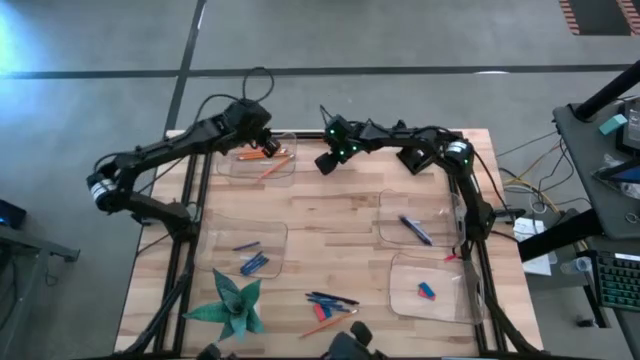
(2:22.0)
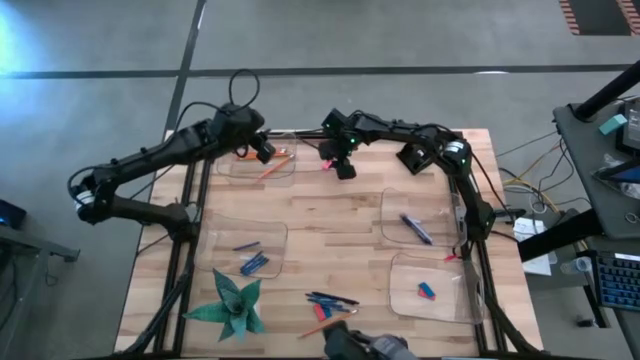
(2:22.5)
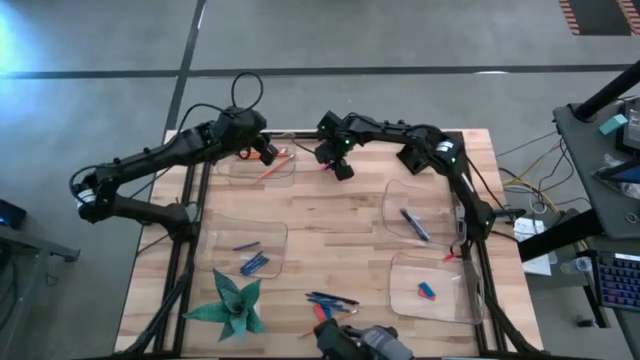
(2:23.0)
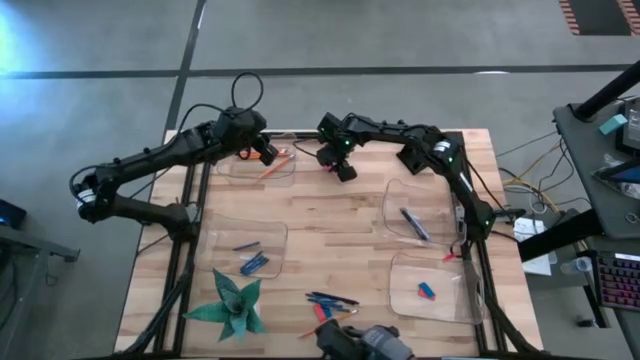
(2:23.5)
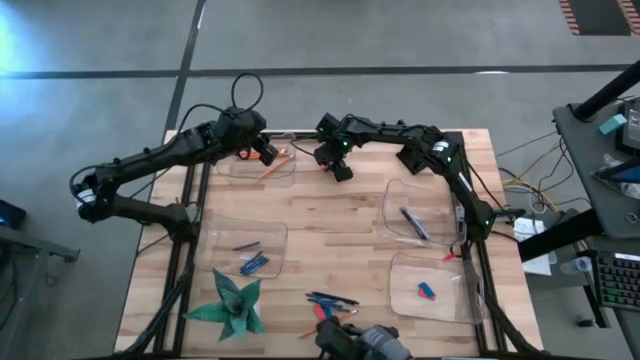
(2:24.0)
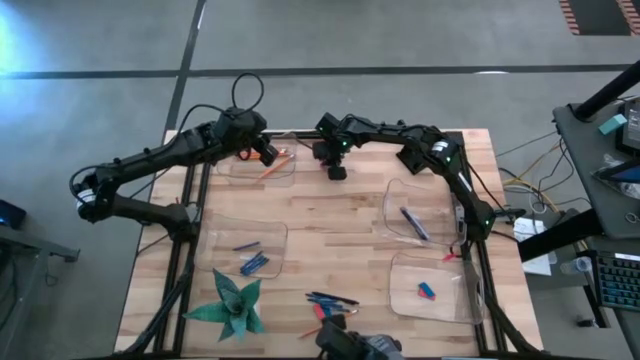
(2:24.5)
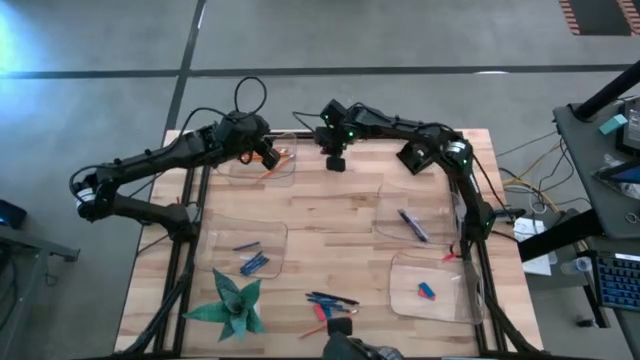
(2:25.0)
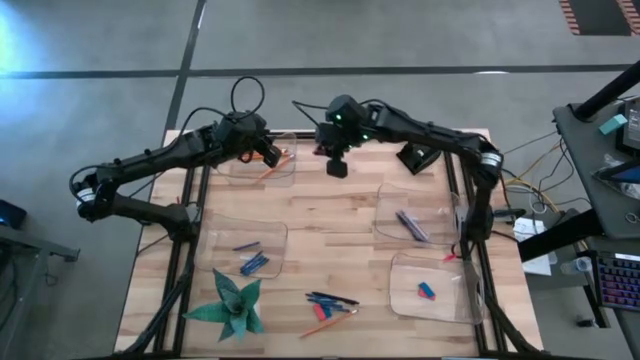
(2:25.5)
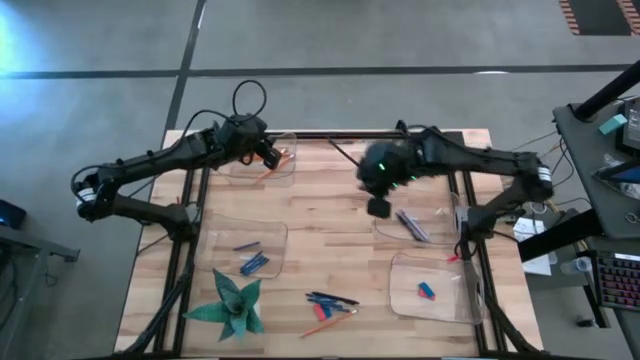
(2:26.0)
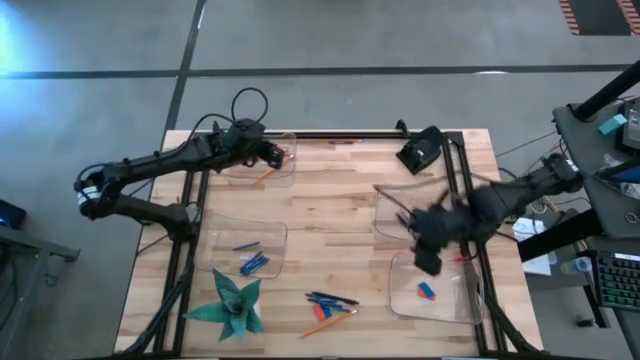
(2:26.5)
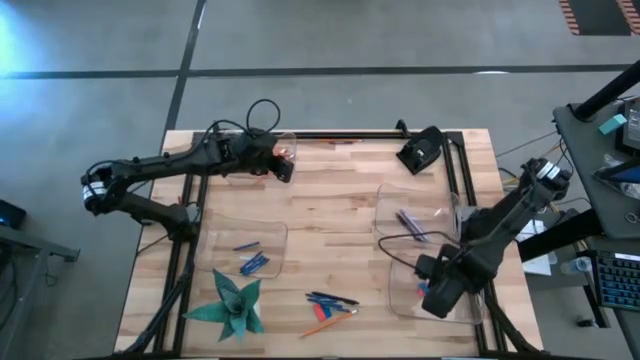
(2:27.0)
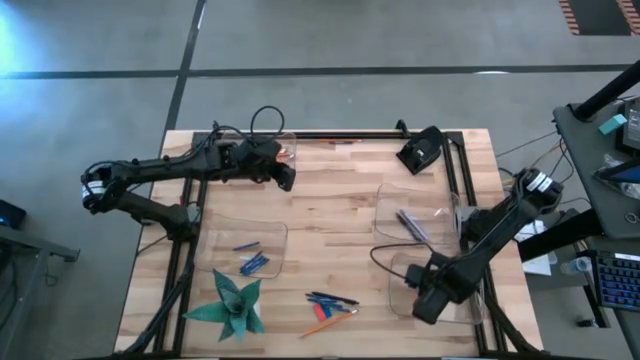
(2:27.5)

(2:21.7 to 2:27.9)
Task: Sort crayons/erasers/pens/pencils in bins
Put the pink eraser into the bottom right transparent bin

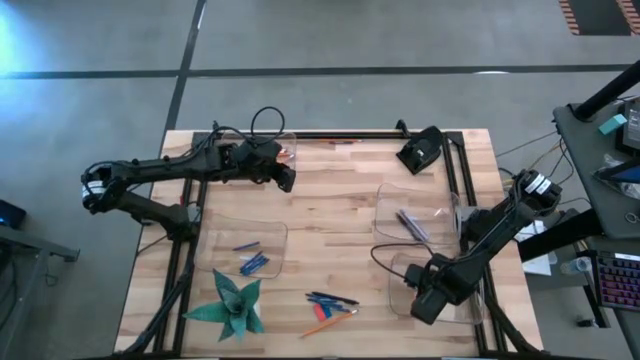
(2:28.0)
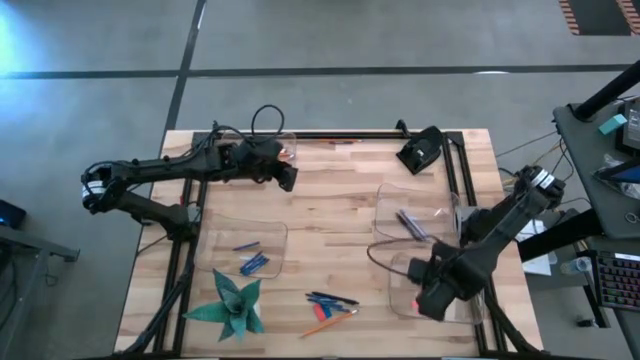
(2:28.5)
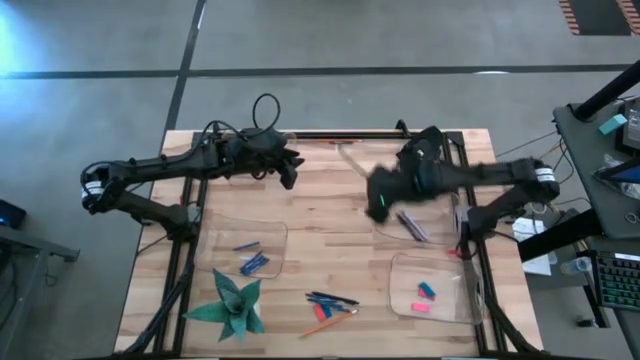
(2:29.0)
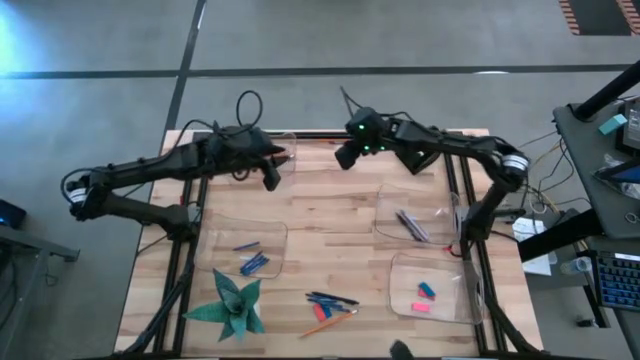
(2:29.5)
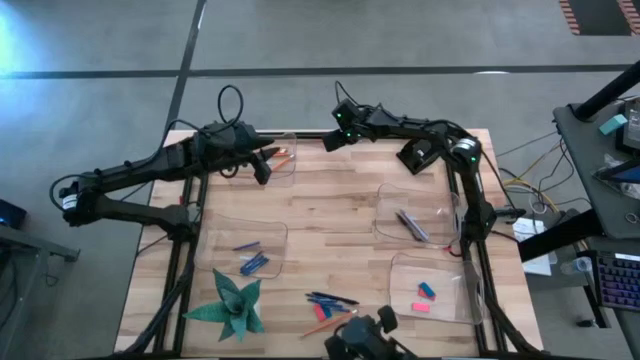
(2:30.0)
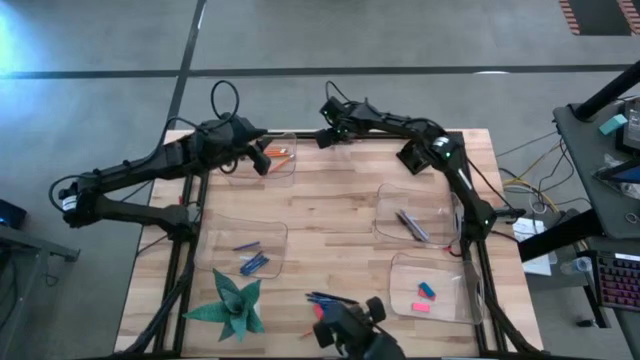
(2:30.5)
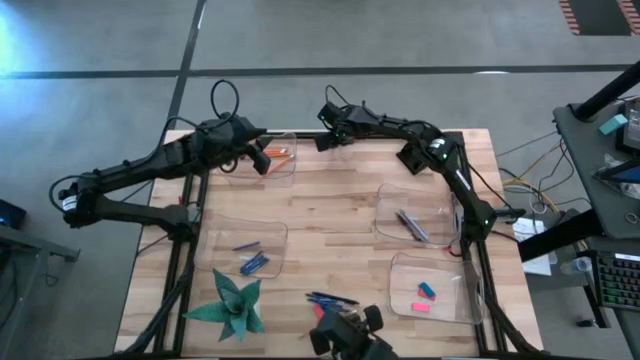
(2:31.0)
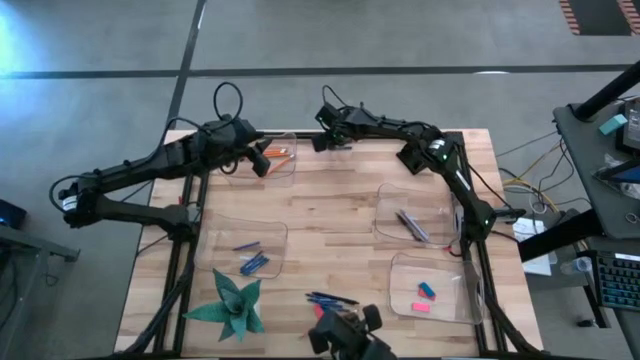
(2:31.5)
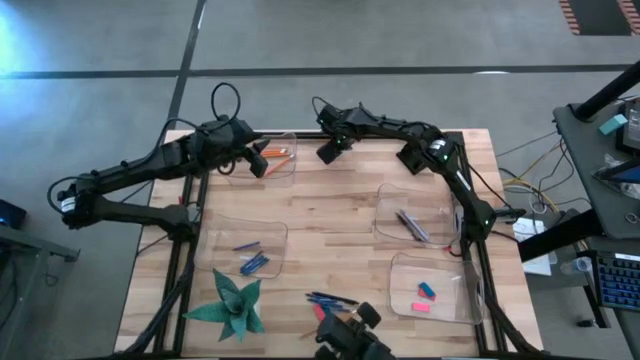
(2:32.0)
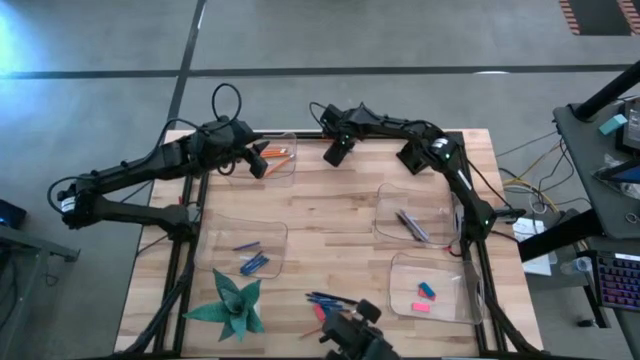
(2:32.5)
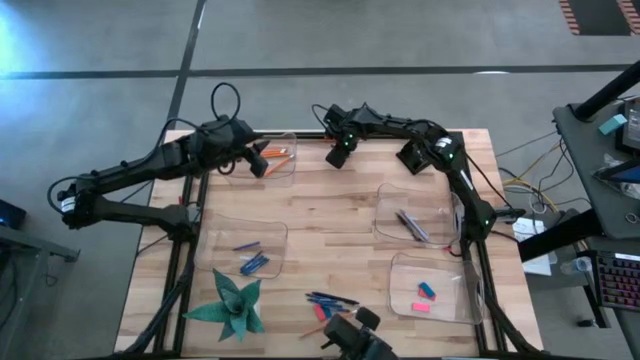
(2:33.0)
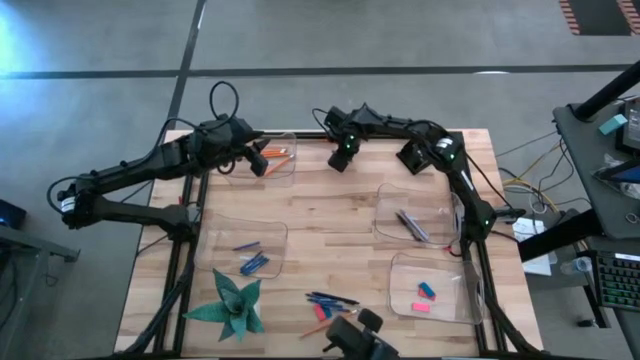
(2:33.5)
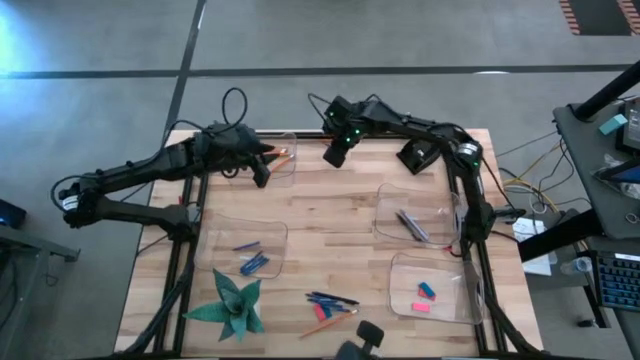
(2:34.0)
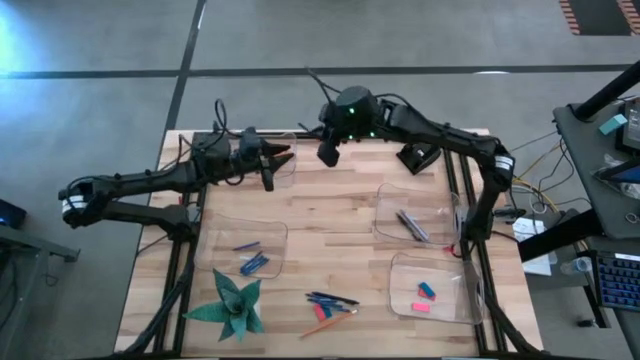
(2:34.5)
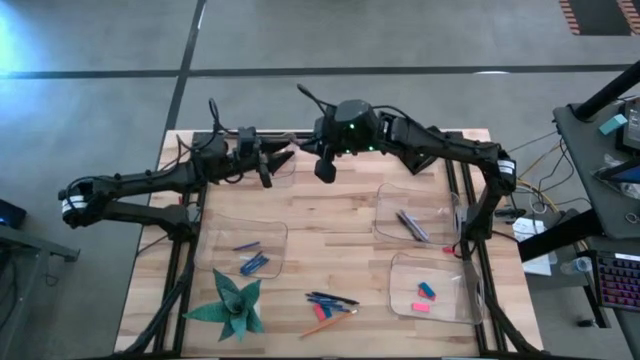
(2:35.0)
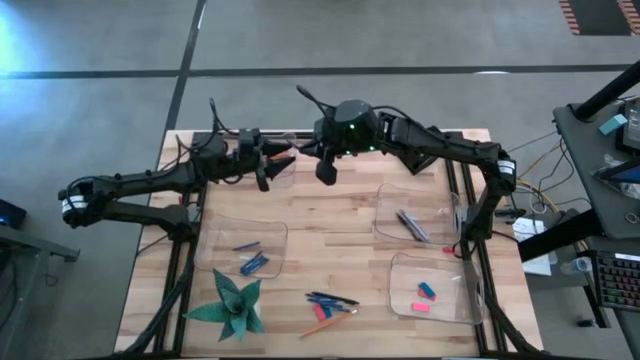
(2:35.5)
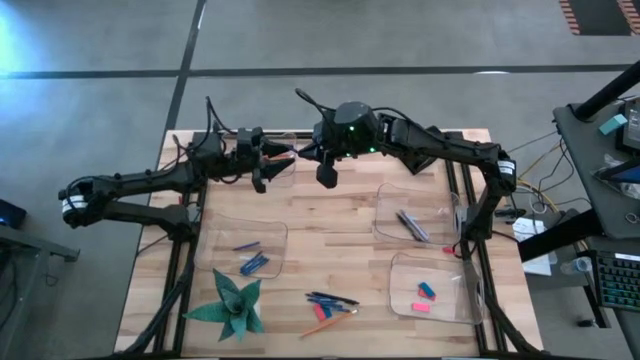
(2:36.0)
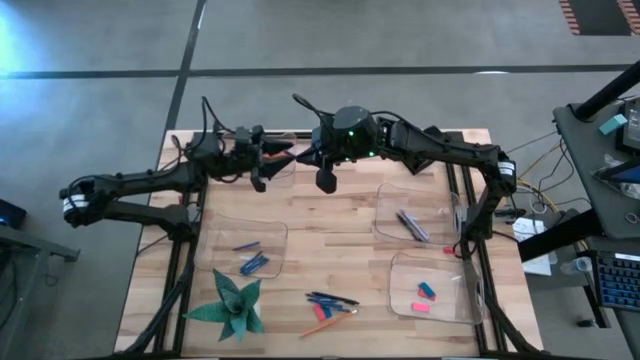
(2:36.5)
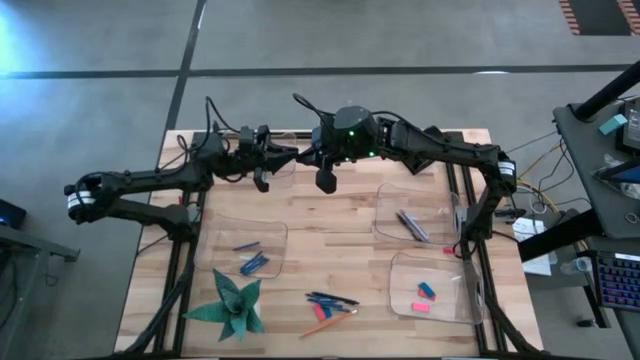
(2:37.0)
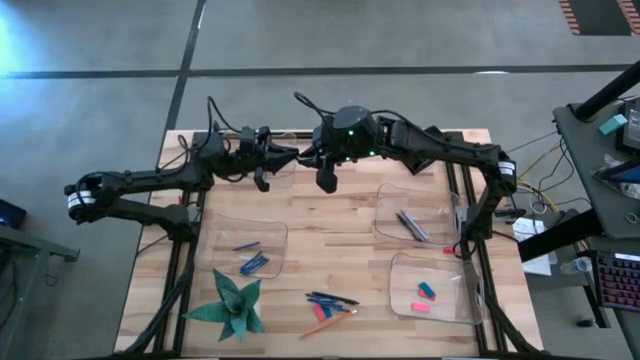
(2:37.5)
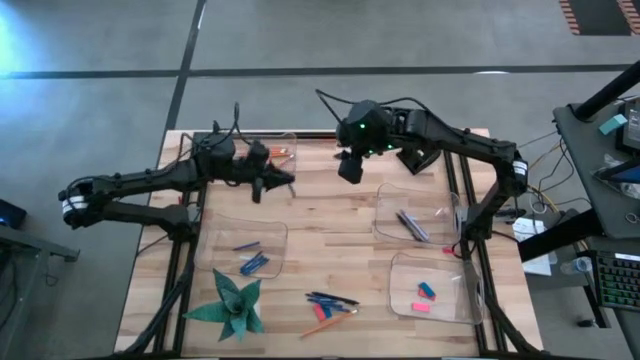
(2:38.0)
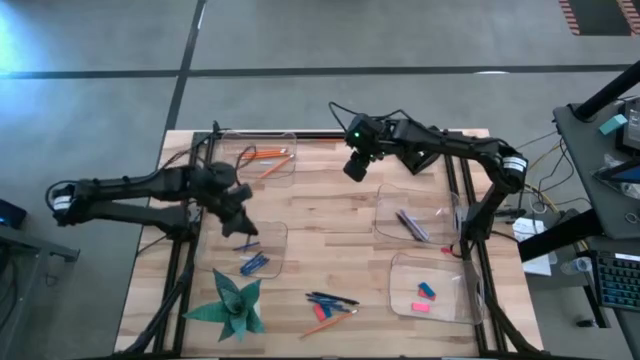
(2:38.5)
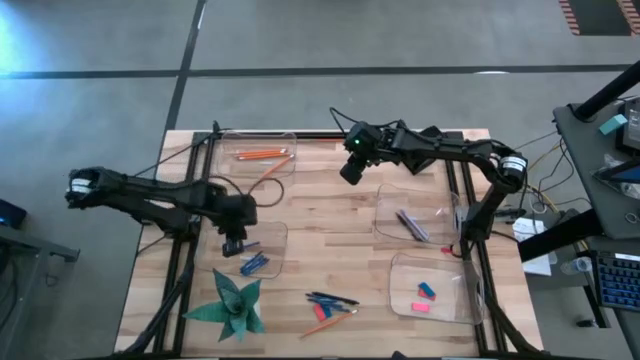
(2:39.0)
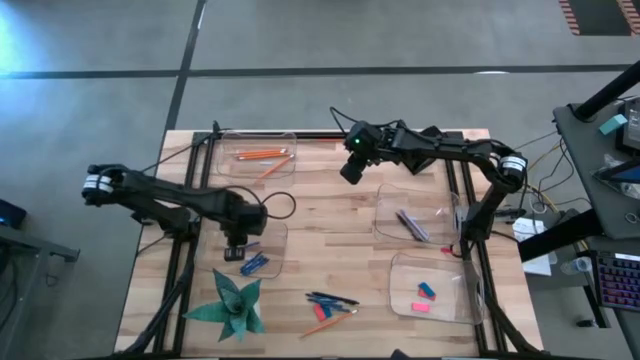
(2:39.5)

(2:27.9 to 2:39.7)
Put the blue crayon into the middle left transparent bin

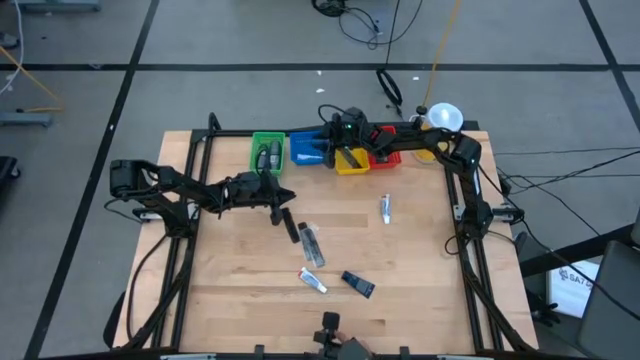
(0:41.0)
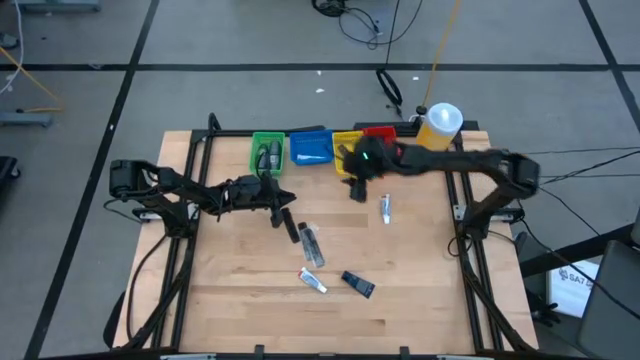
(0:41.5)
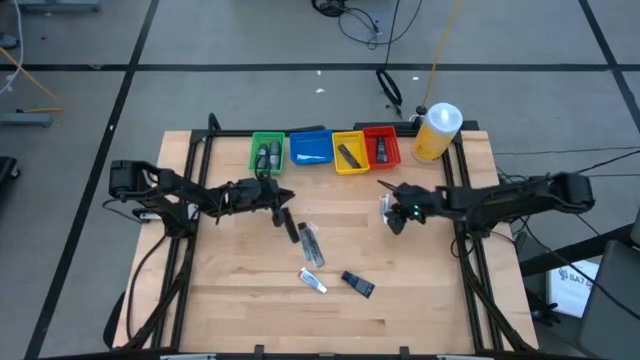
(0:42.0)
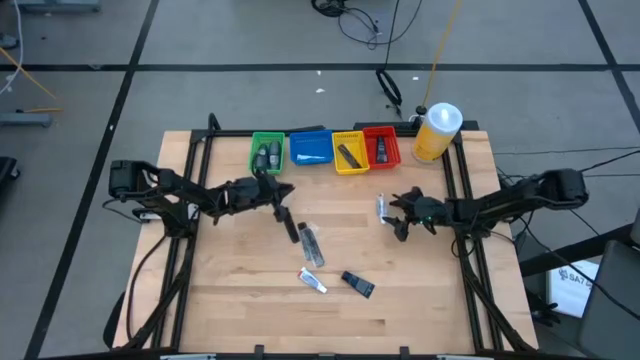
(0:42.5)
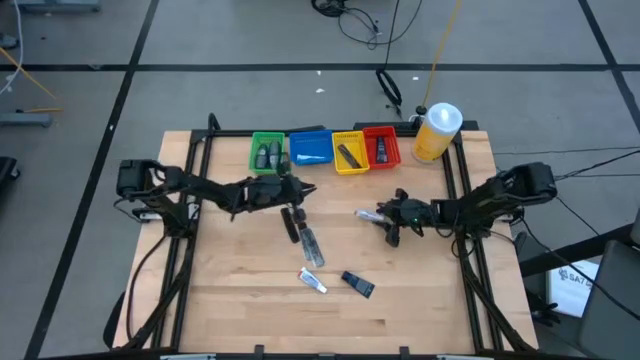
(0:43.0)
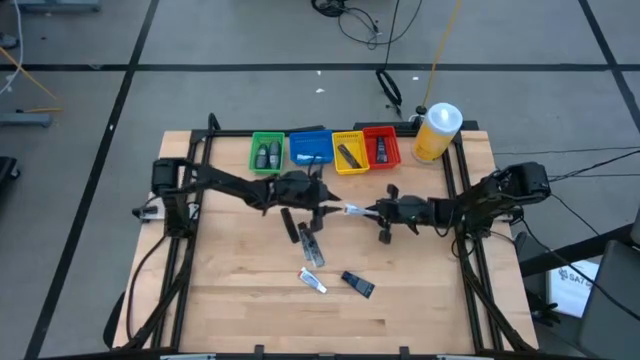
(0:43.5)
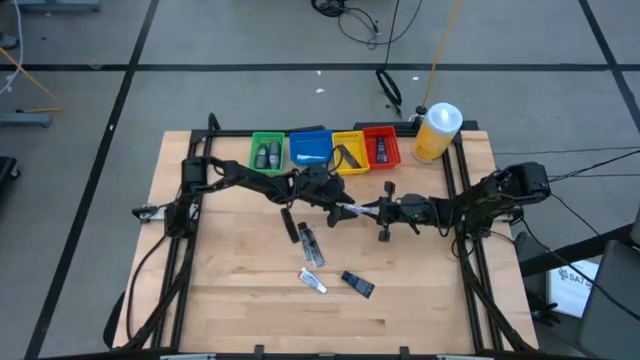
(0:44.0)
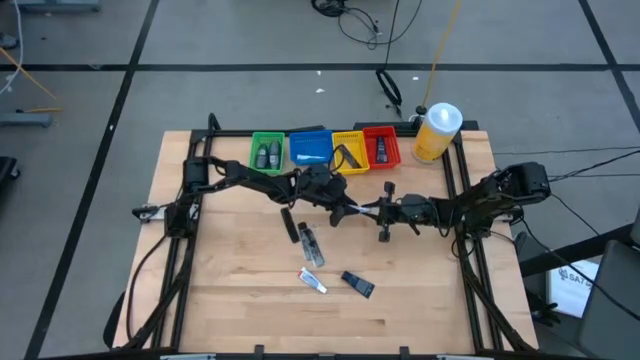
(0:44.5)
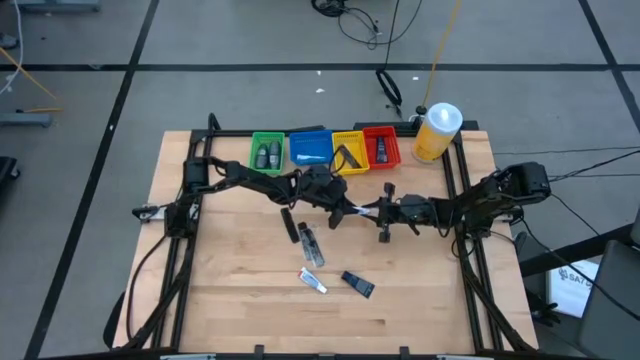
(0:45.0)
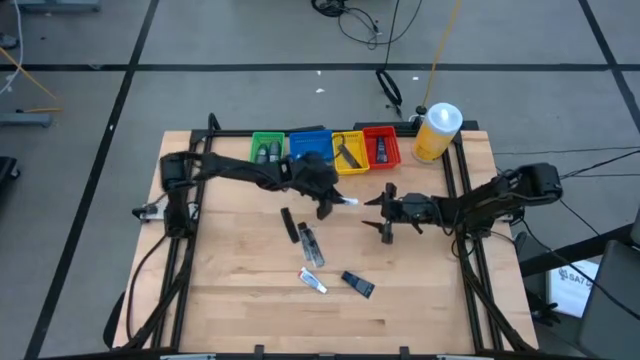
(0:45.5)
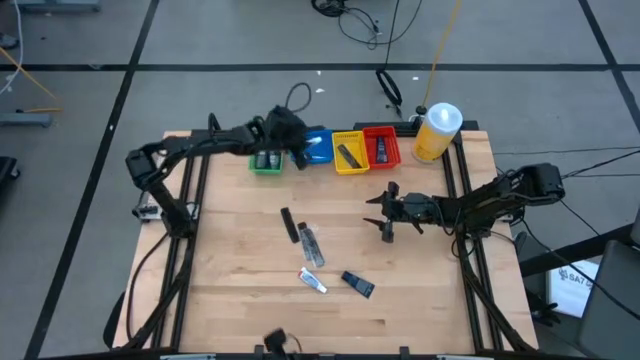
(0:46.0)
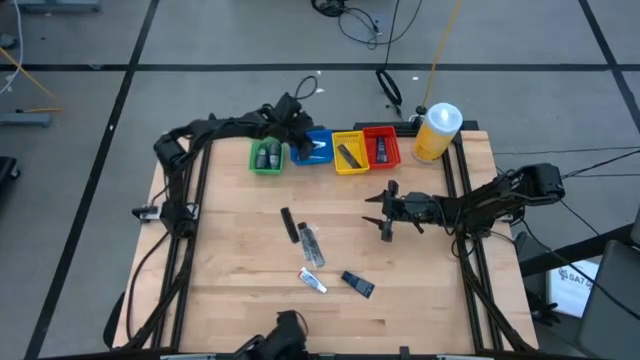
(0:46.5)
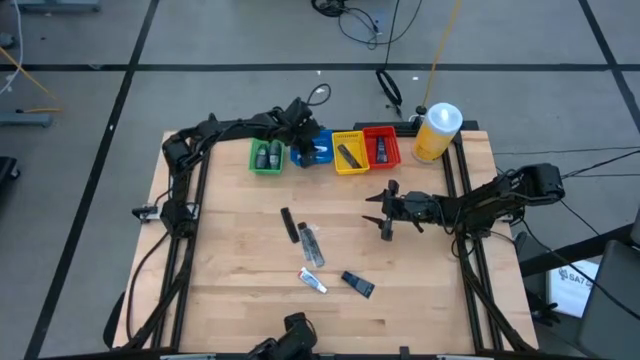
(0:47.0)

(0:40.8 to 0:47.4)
Task: Pick & Place Travel size toiletries
Put the top white toothpaste into the blue bin
